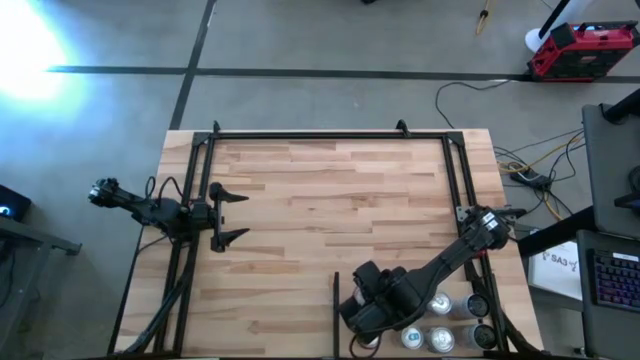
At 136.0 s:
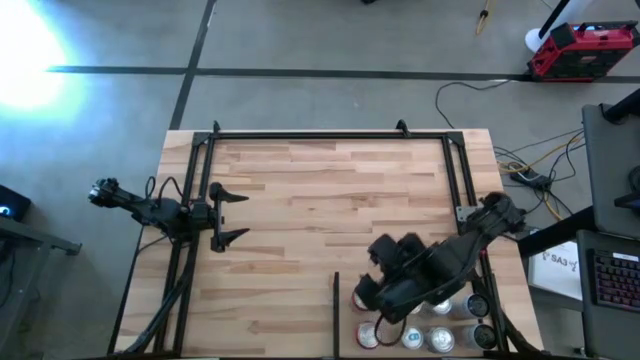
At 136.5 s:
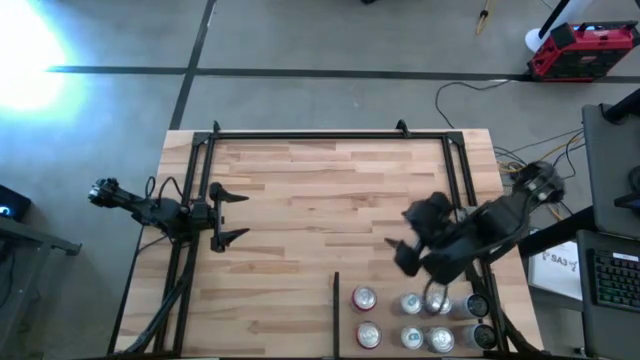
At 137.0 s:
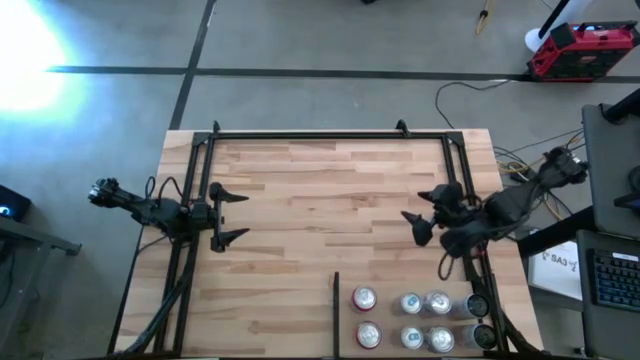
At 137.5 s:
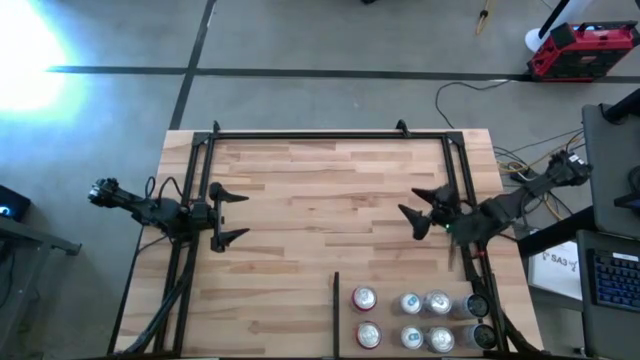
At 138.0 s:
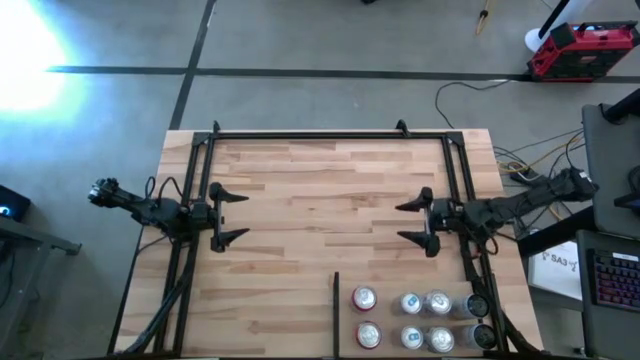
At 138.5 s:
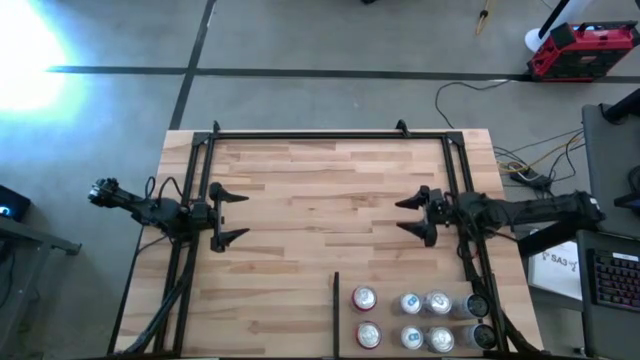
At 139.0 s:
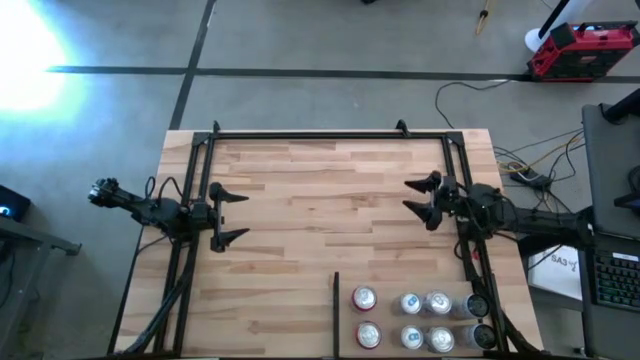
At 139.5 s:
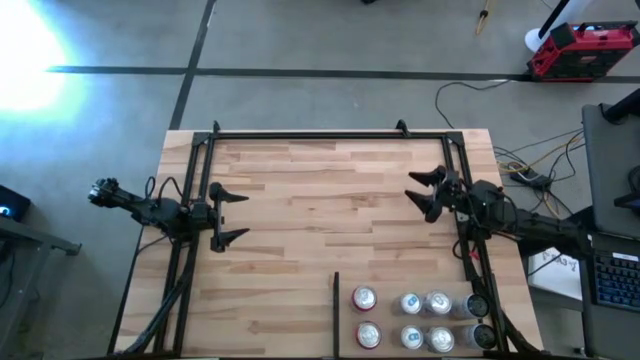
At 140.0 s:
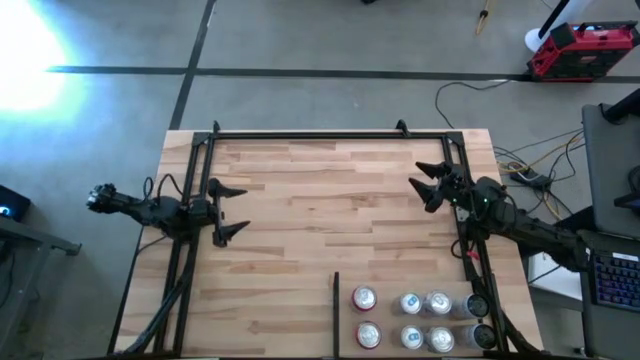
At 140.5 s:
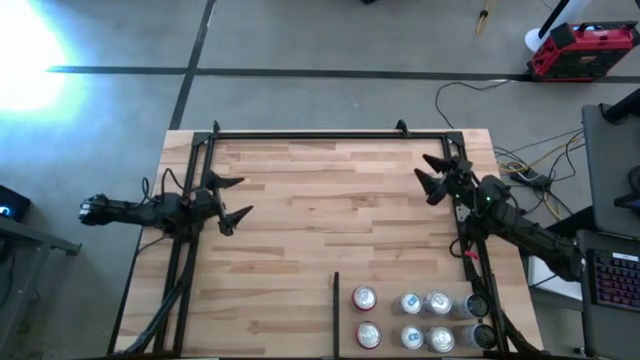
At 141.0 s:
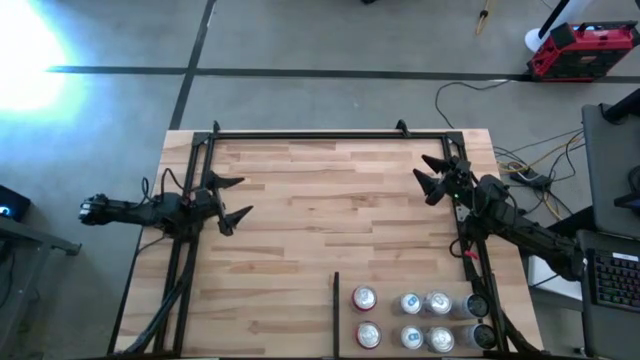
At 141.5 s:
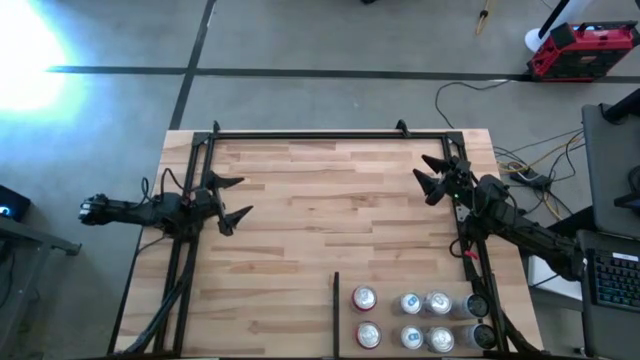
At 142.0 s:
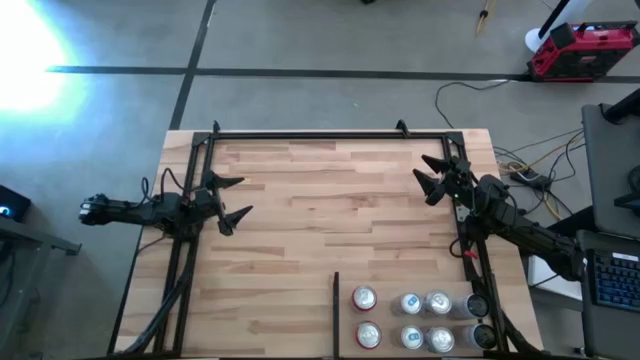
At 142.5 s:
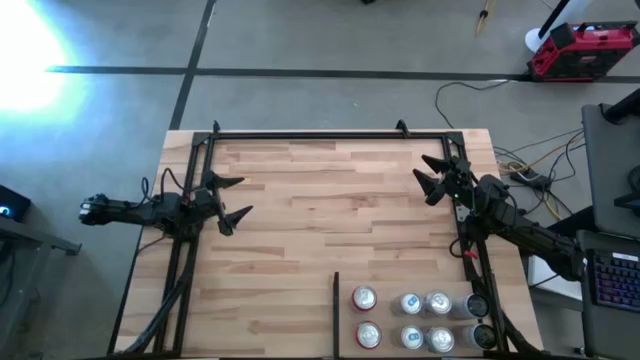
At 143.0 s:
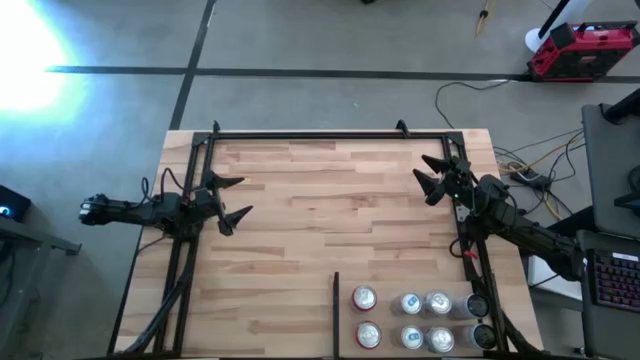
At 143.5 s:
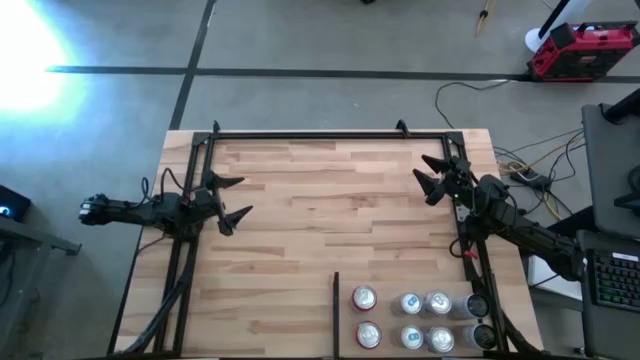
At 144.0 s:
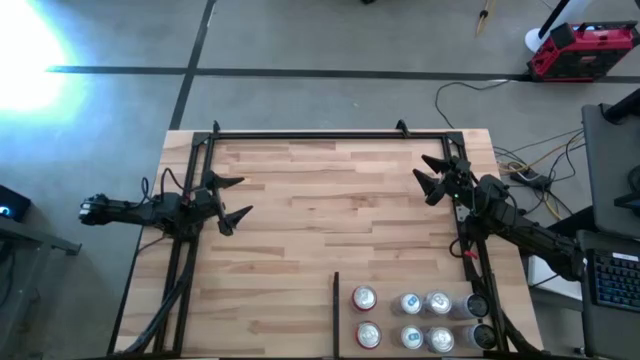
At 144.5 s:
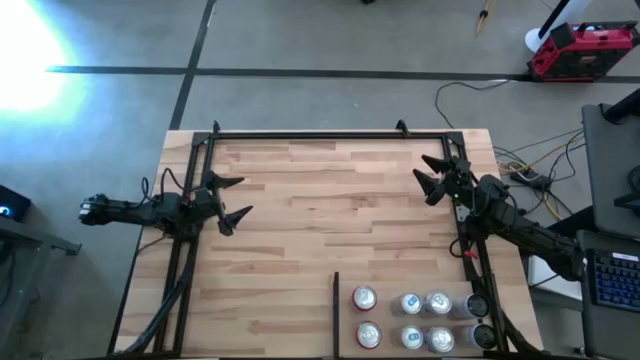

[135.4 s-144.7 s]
Task: Place canned beverage on shelf
Return to Home Position

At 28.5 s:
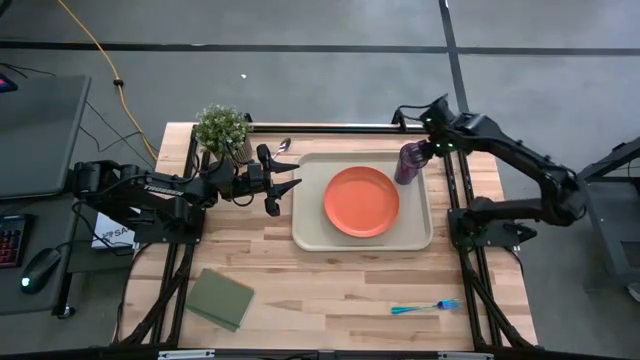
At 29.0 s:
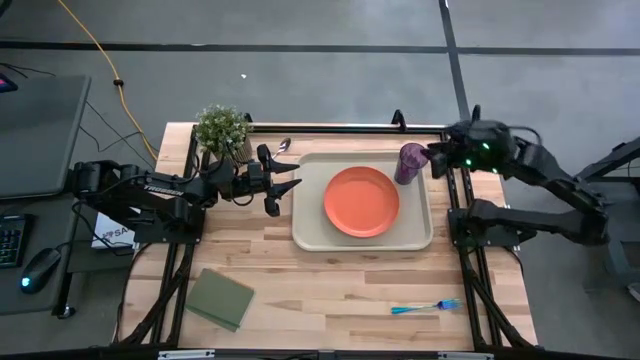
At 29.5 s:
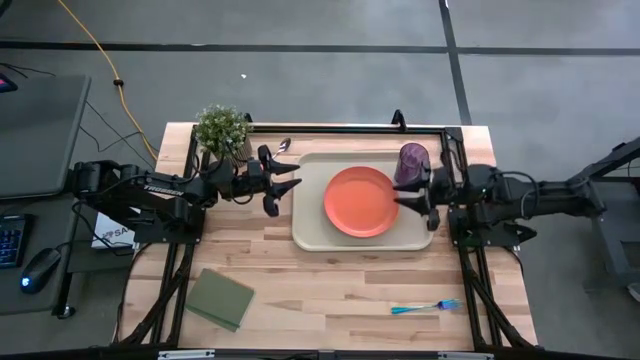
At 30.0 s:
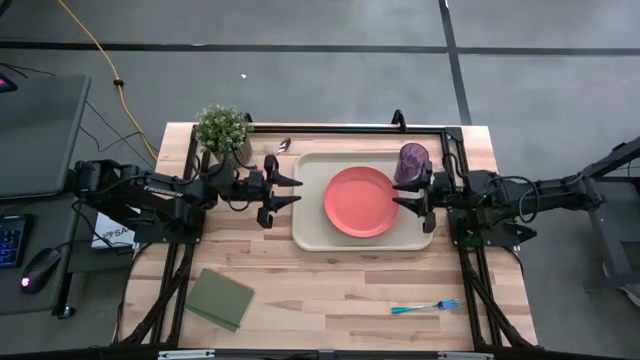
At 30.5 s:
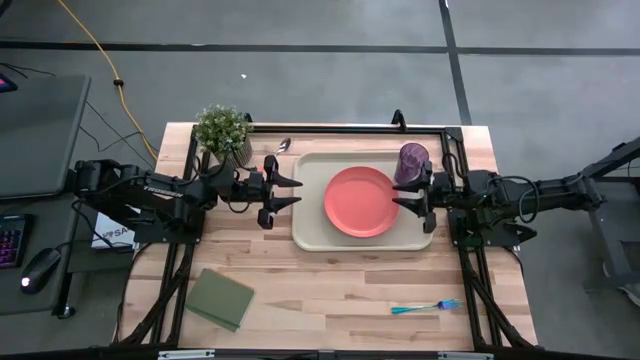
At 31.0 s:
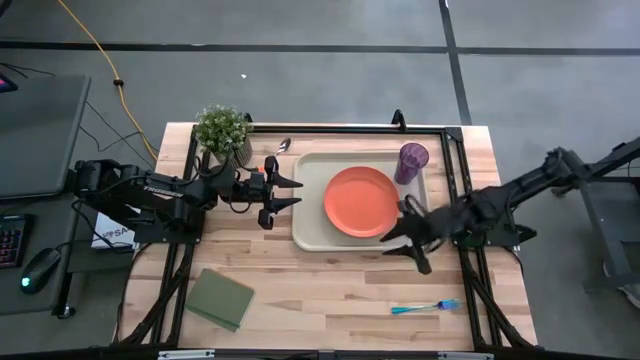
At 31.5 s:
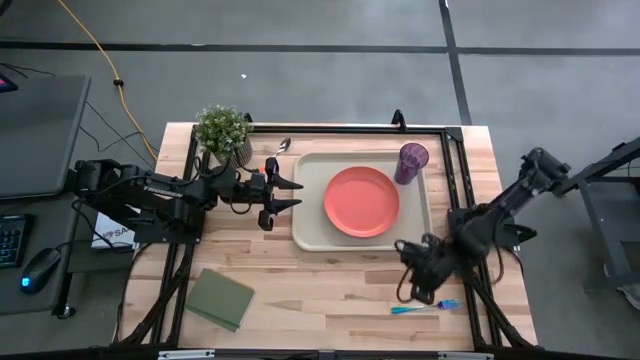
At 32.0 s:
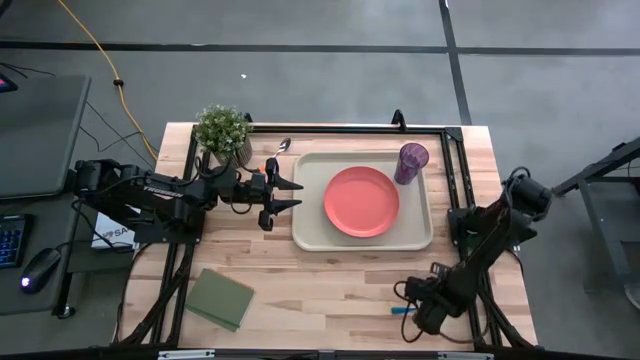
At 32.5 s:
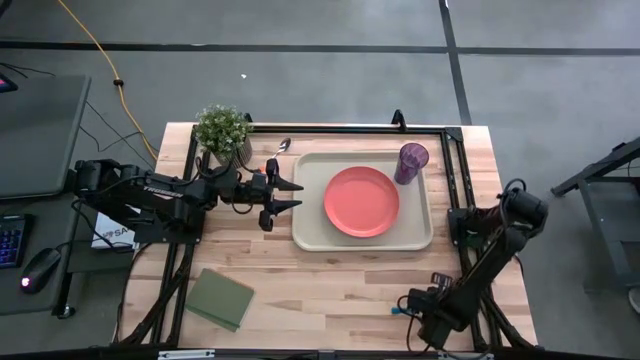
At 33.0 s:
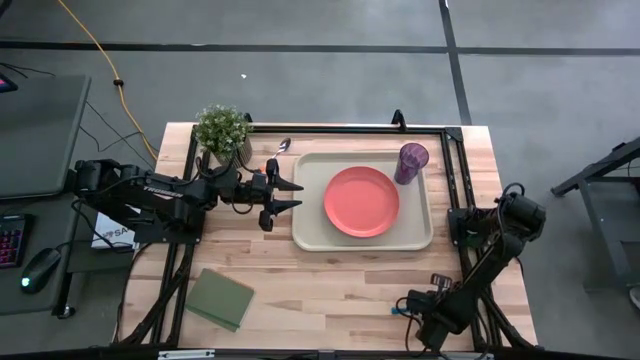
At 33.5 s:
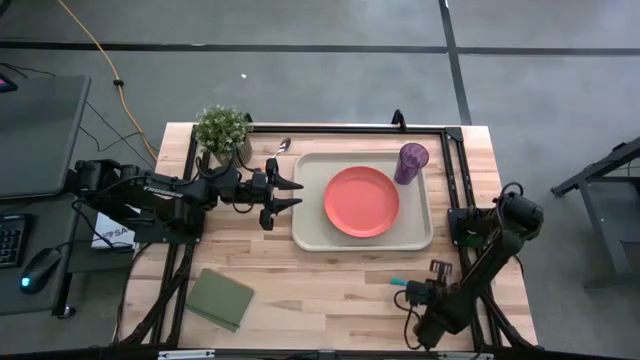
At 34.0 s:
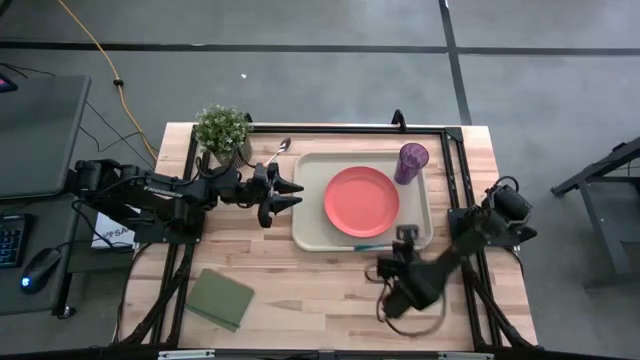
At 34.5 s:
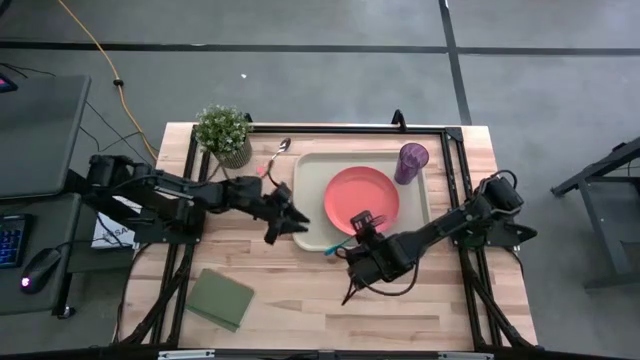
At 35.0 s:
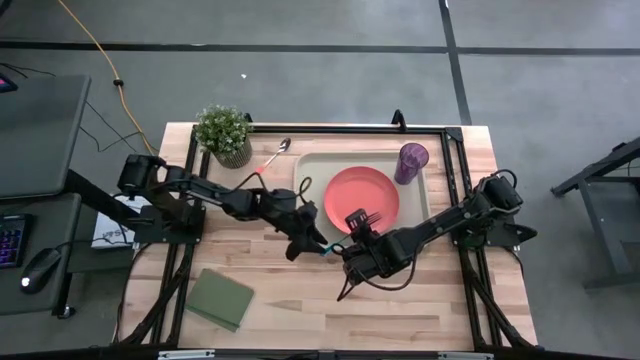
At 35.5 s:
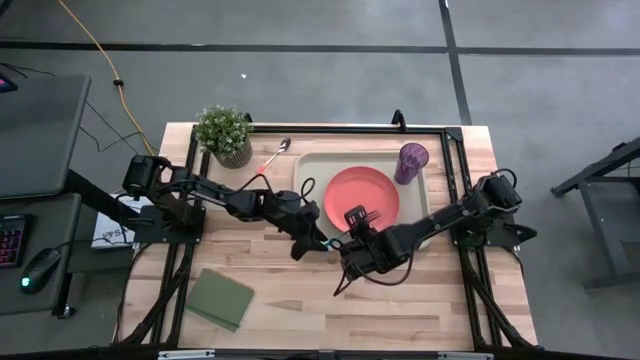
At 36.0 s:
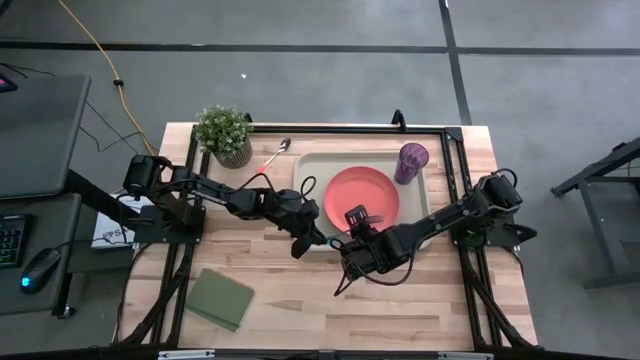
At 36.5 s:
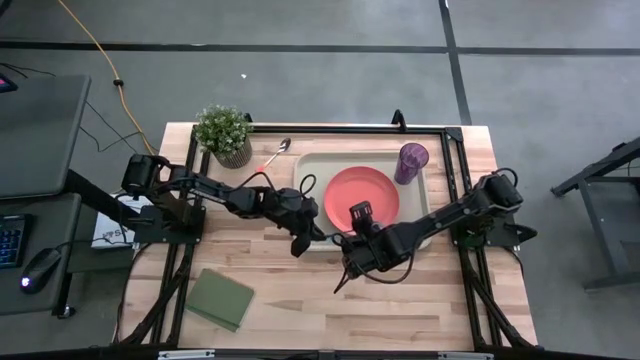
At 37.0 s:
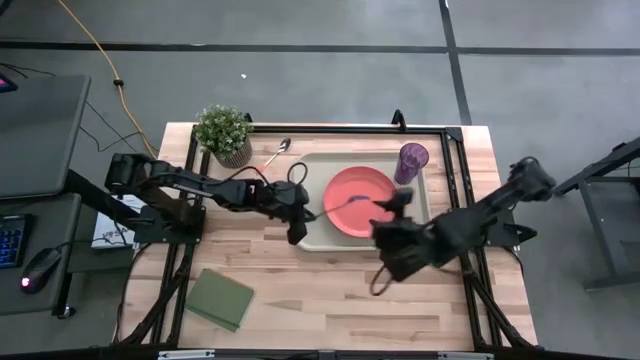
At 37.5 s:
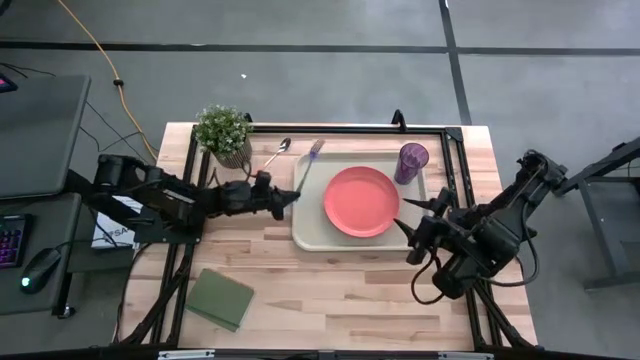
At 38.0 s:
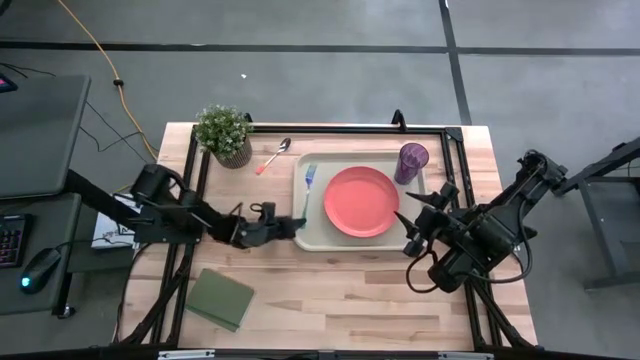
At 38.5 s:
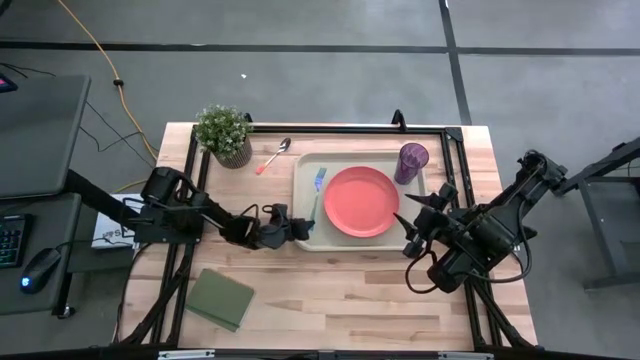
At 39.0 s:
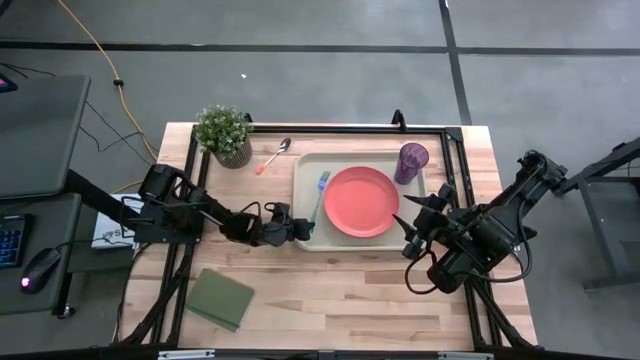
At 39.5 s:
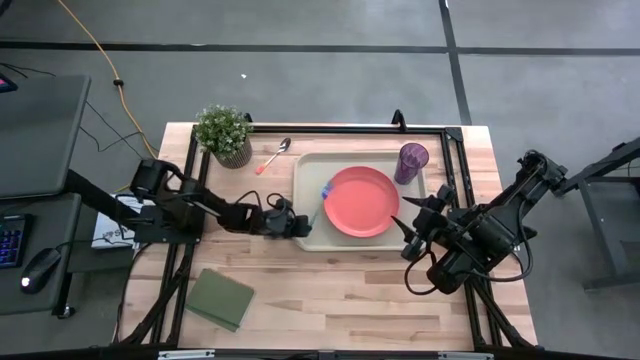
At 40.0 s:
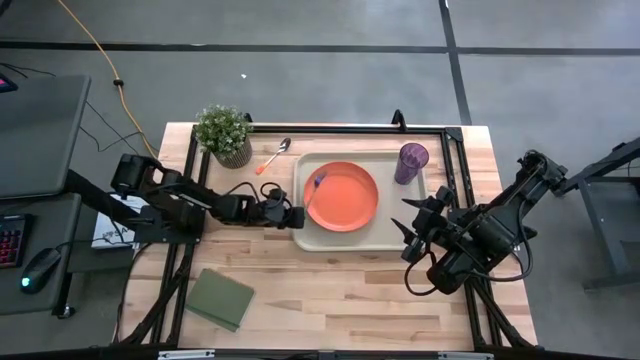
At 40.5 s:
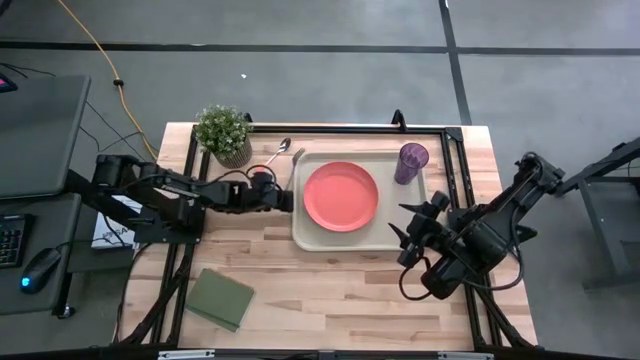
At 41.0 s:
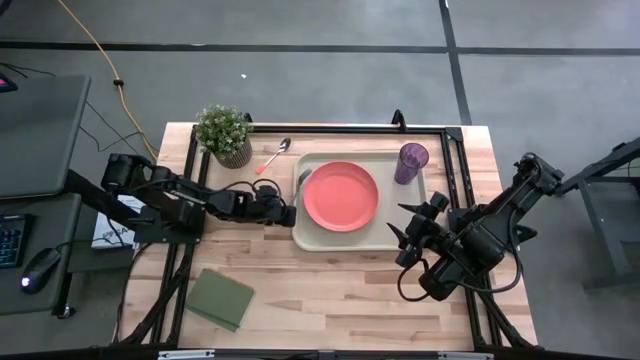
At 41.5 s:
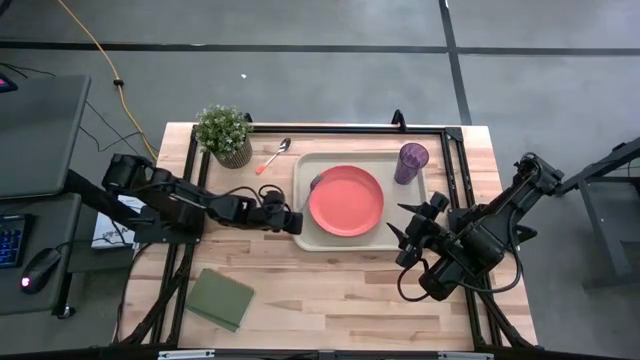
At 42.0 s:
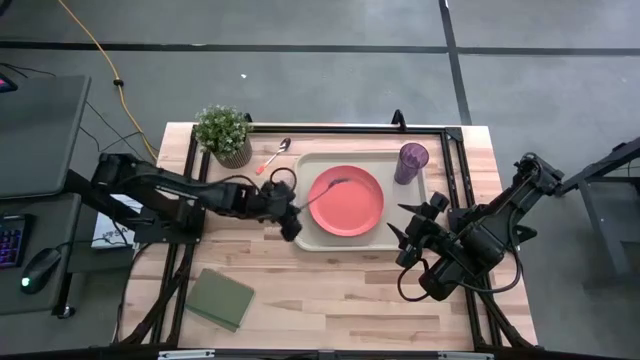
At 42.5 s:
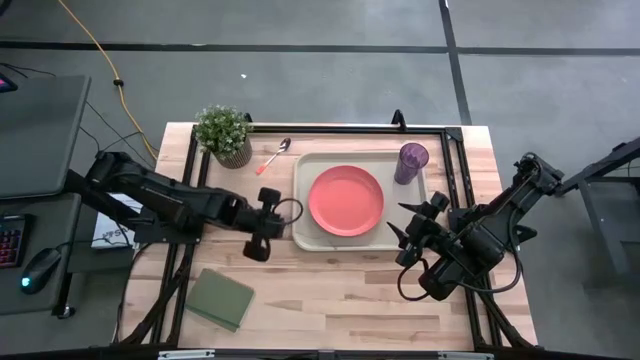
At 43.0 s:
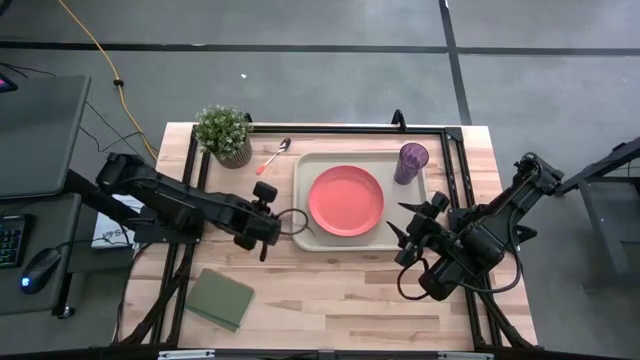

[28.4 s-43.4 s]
Task: Pick and place plate/cup/fork/spoon on tray
Put the blue fork on the white serving tray to the left of the orange plate
